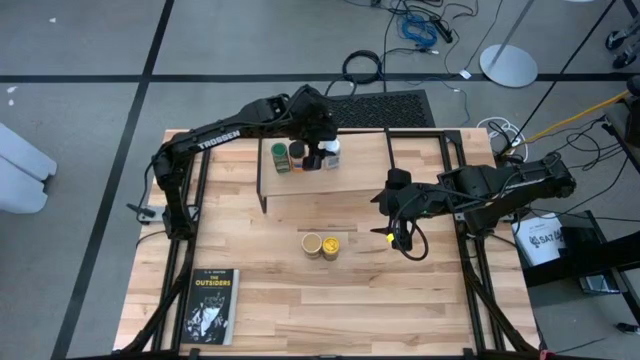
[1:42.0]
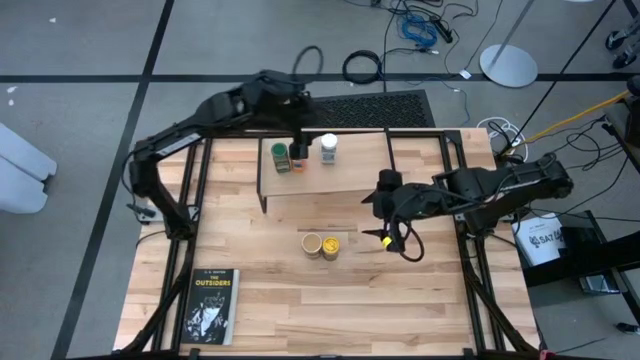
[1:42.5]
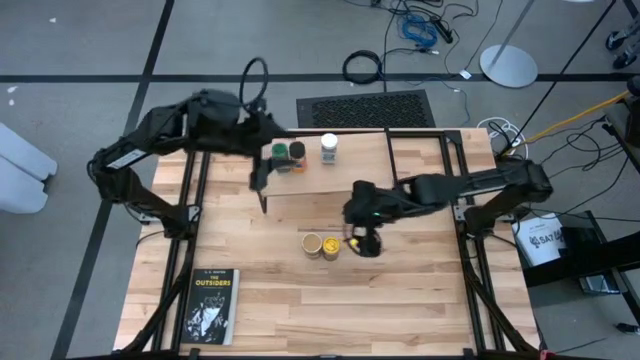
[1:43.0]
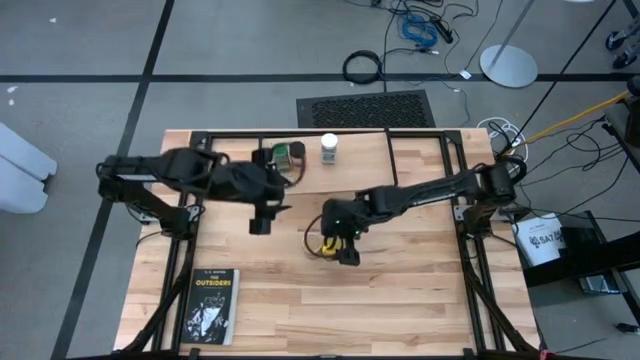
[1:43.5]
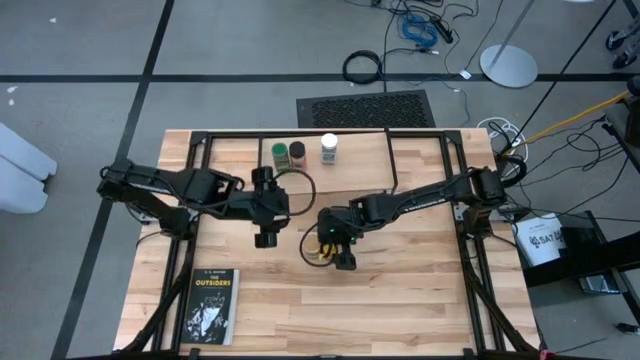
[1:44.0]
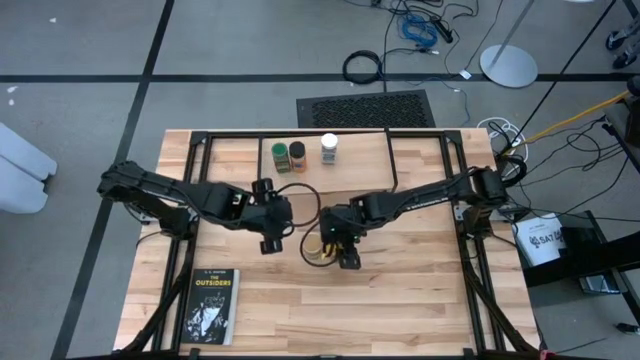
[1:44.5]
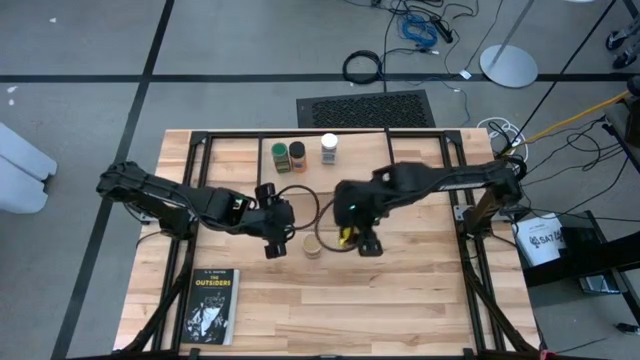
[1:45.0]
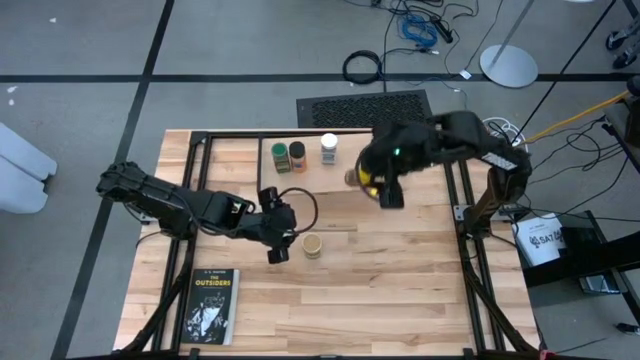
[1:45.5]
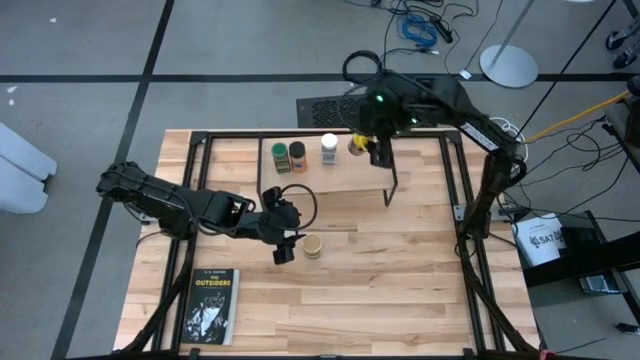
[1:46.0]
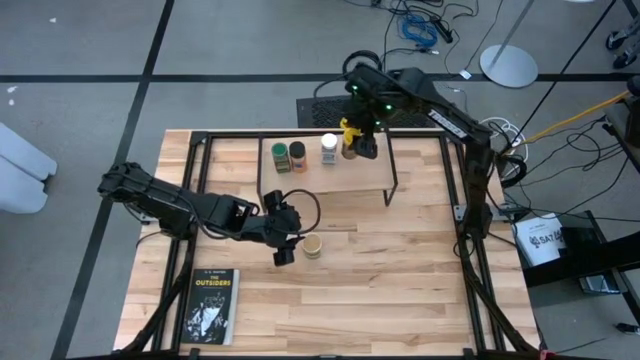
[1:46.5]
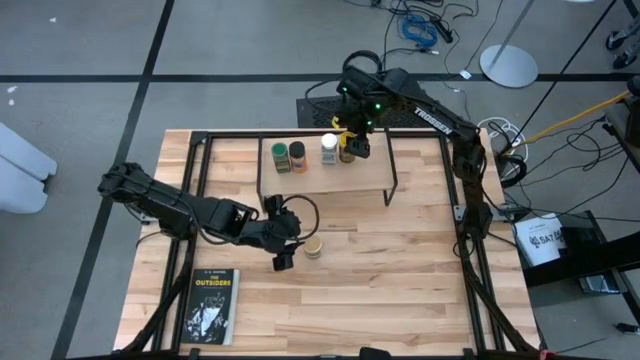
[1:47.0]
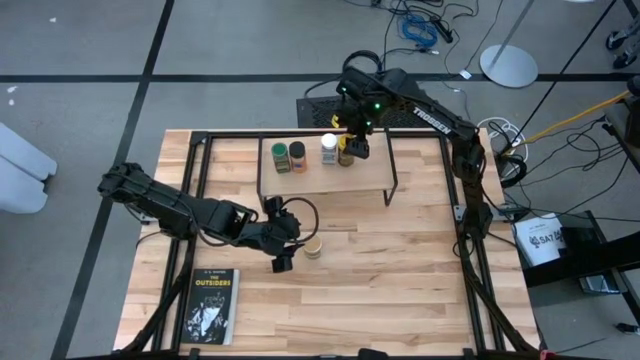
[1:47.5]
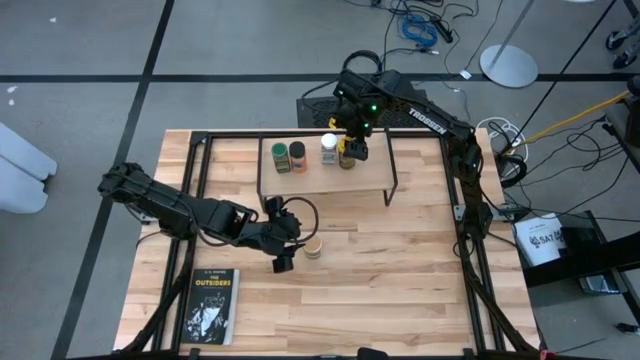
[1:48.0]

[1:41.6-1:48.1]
Task: Shelf spices
Put the yellow black seasoning bottle on the shelf

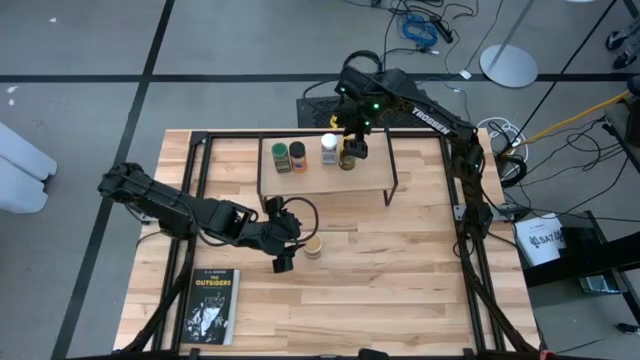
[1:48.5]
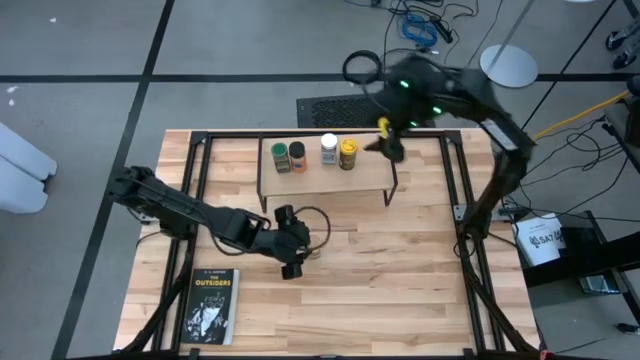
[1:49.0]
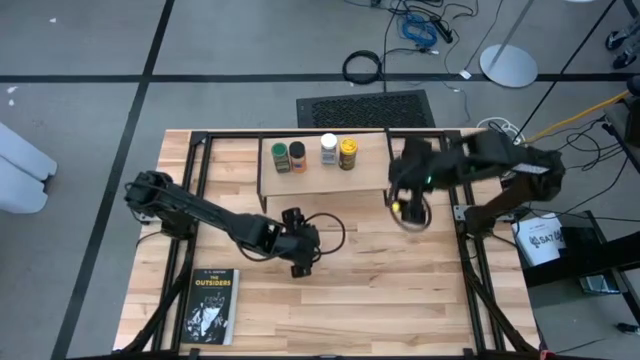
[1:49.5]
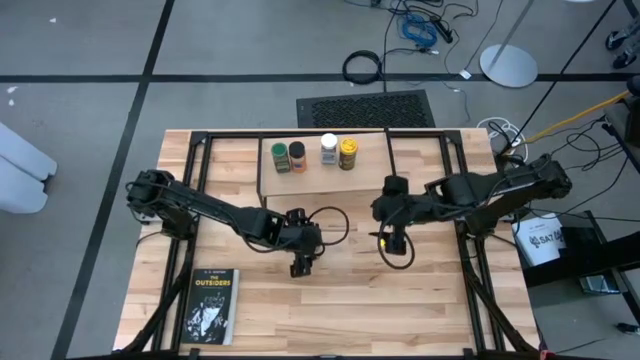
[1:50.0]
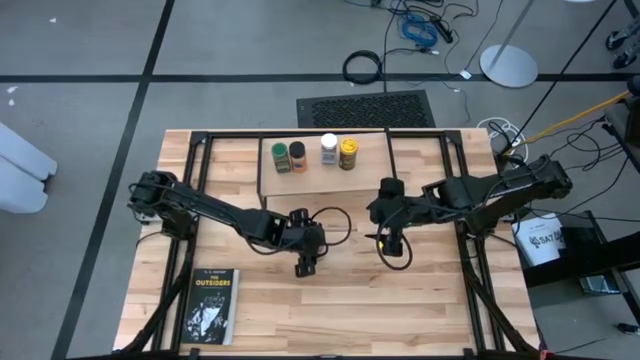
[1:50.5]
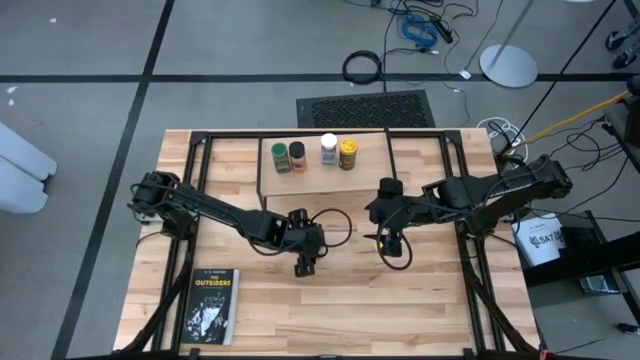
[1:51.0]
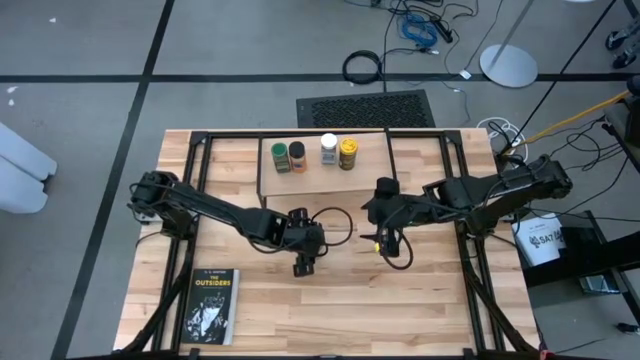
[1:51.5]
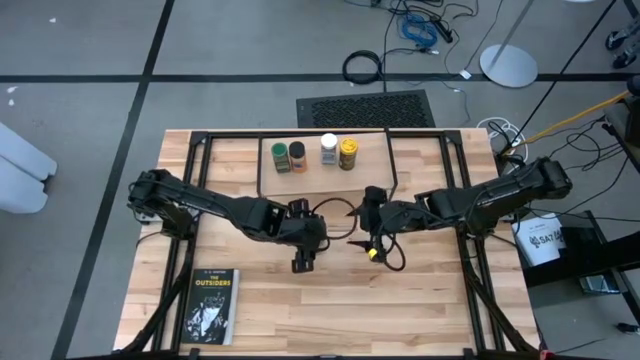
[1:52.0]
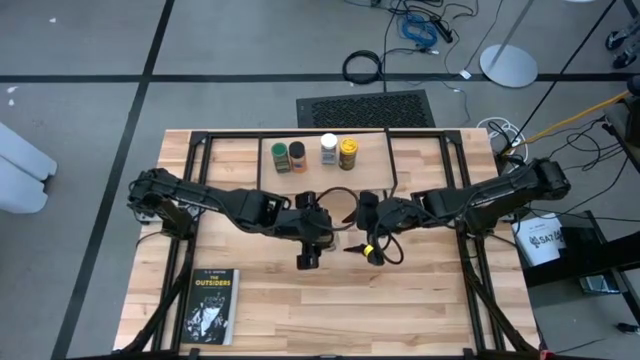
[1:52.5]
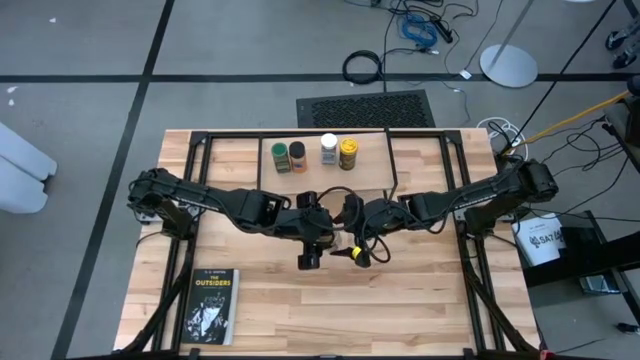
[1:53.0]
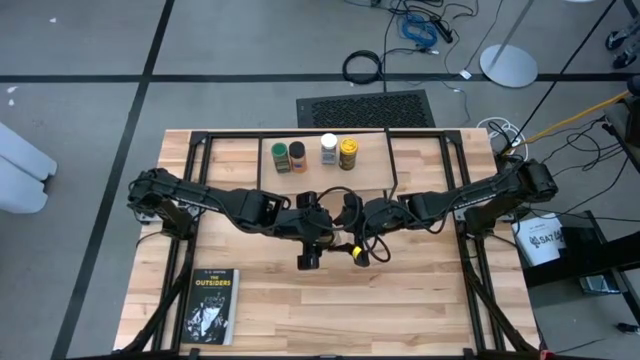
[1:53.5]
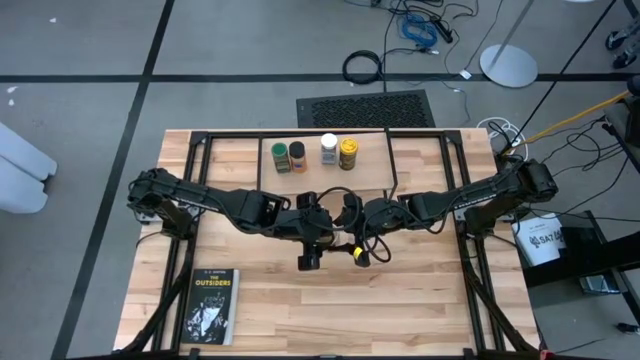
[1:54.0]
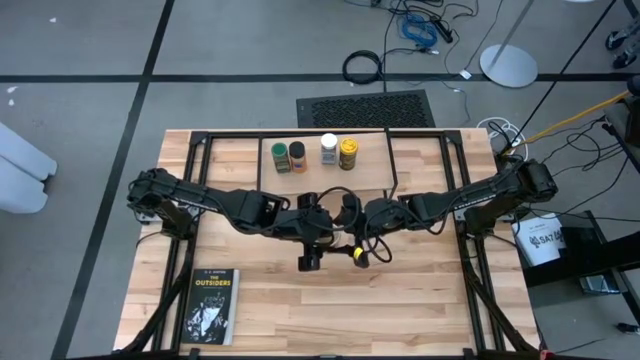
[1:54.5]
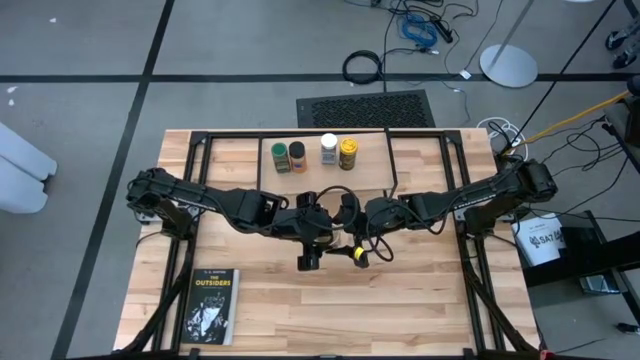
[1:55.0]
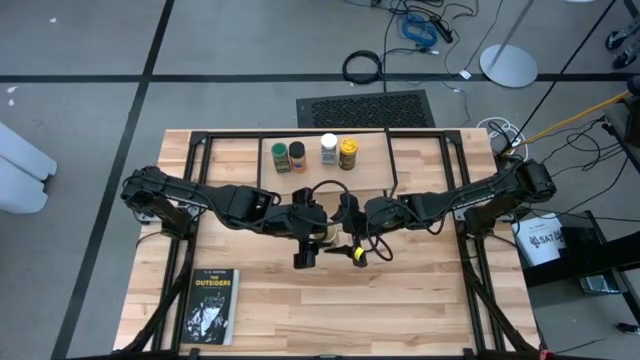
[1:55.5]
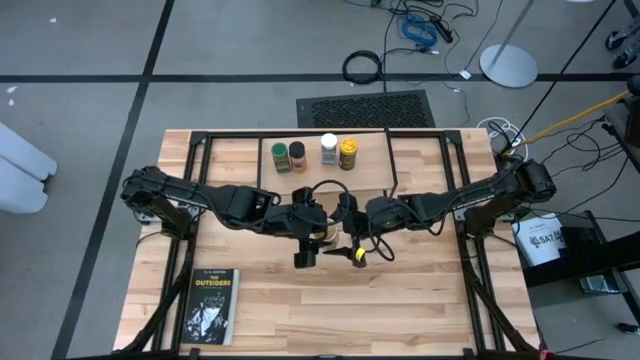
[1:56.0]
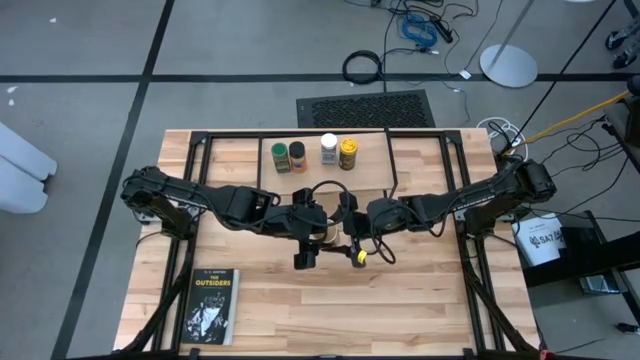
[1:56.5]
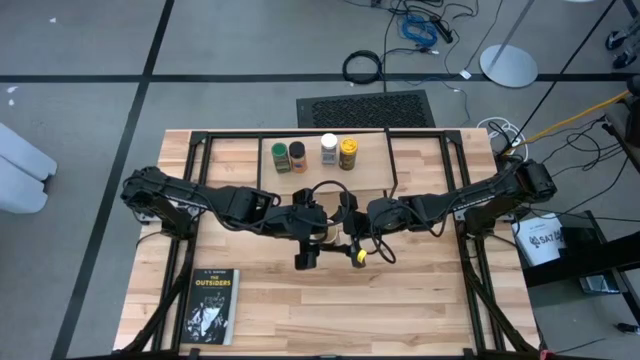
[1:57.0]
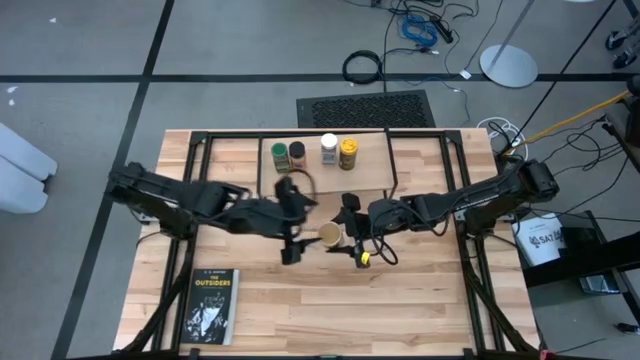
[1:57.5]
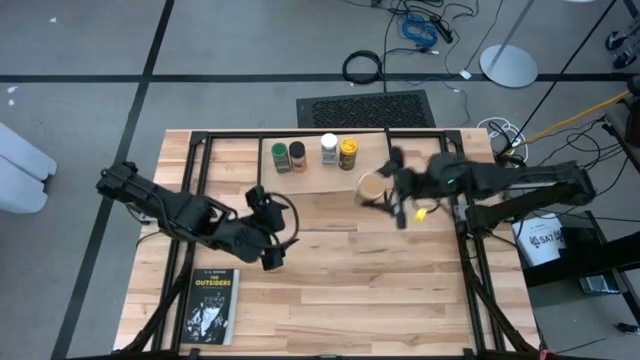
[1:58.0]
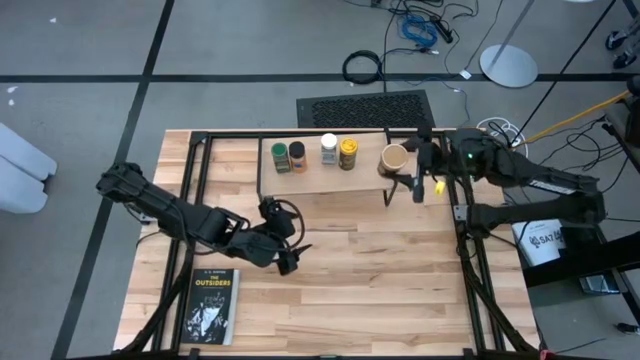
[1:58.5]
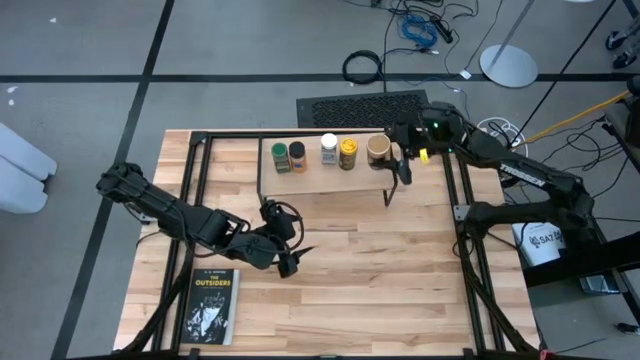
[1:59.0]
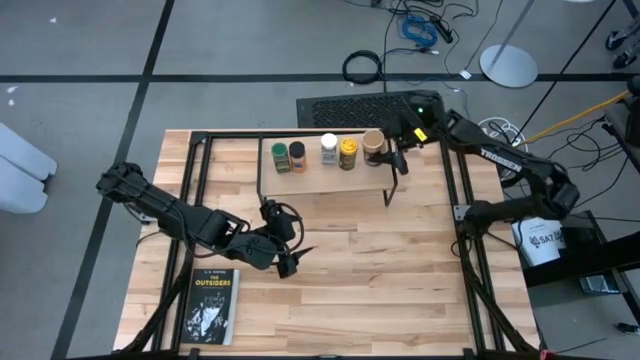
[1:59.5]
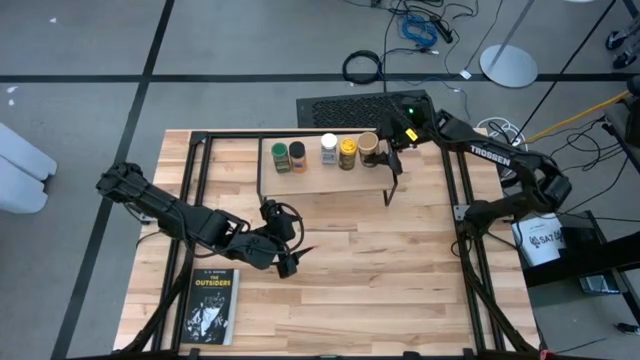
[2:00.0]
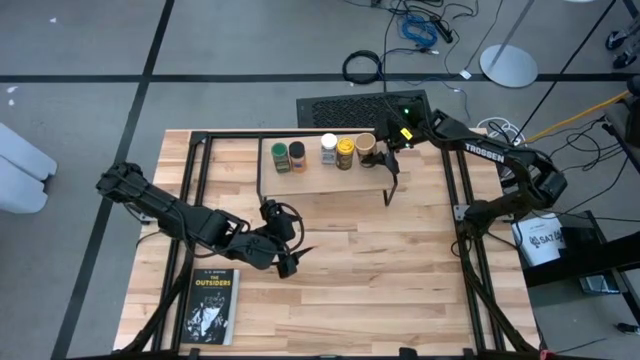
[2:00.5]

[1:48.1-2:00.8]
Put the brown seasoning bottle on the shelf

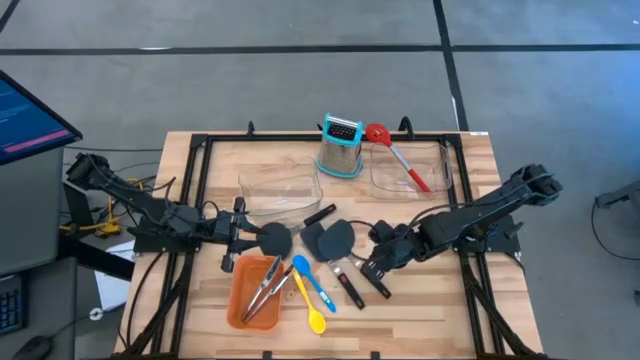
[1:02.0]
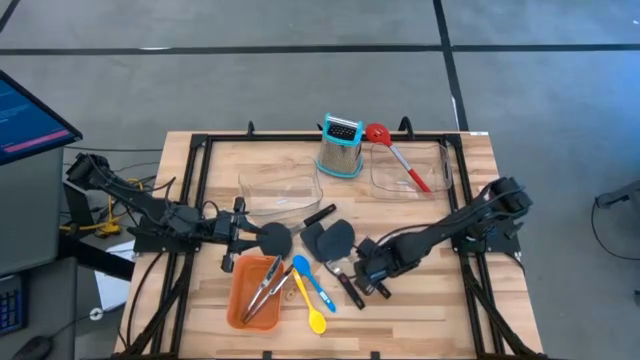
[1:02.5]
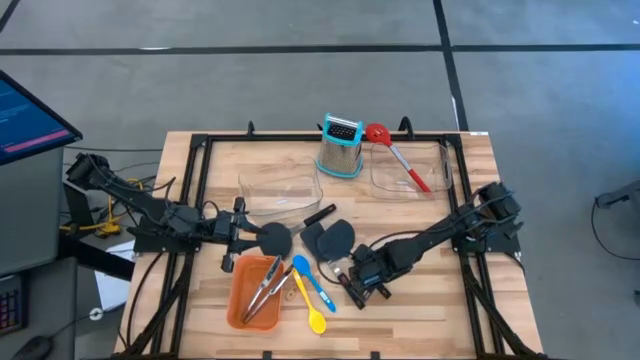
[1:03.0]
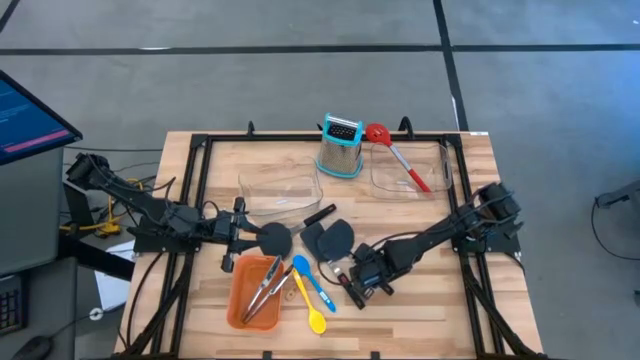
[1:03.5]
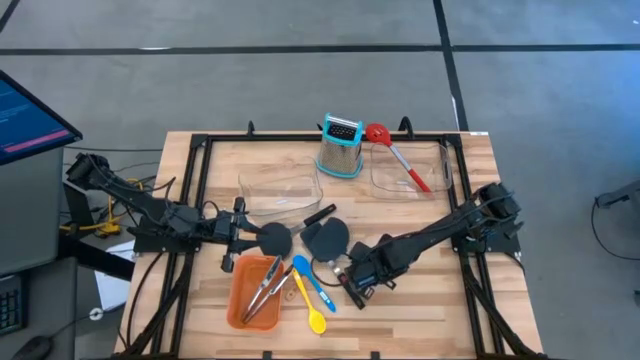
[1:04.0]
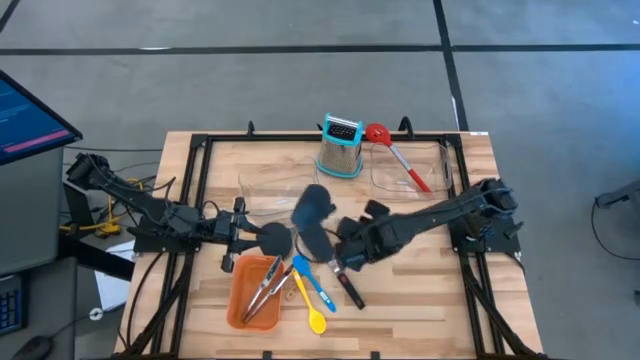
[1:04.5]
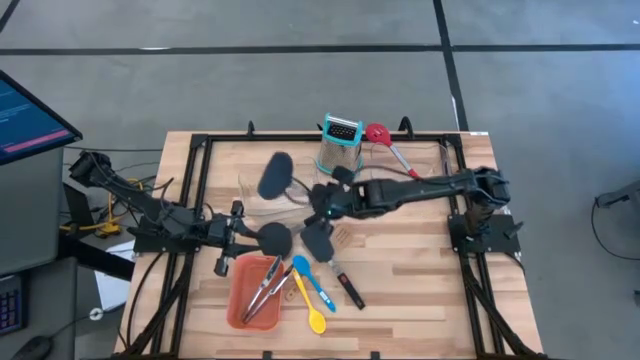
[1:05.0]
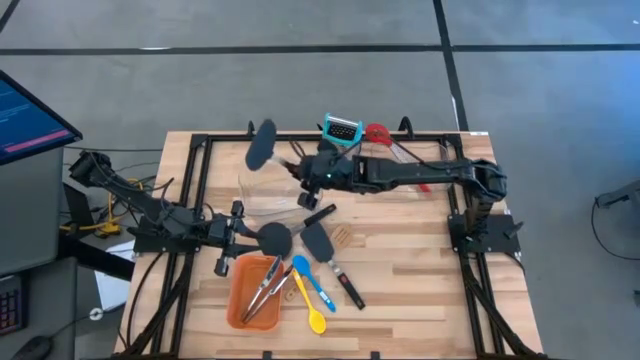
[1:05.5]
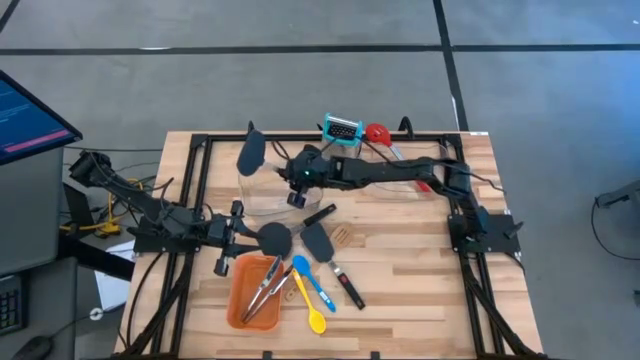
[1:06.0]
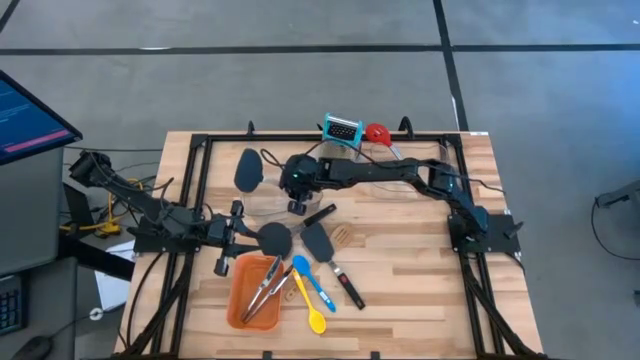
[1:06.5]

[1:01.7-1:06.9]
Task: Pick & Place Kitchen Items
Put the right black spatula into the left transparent bin
